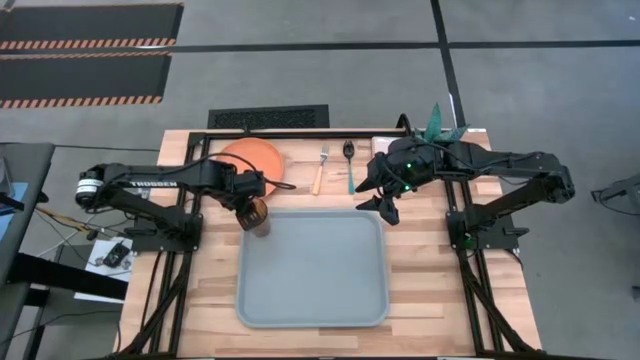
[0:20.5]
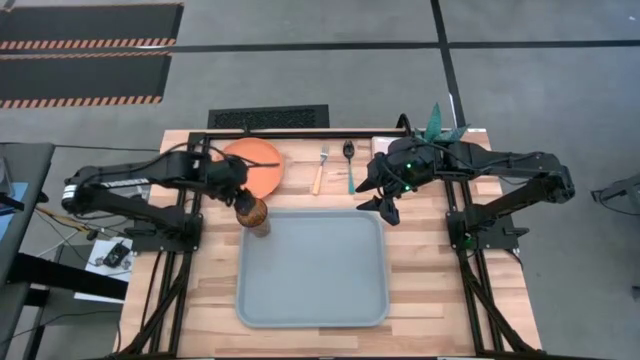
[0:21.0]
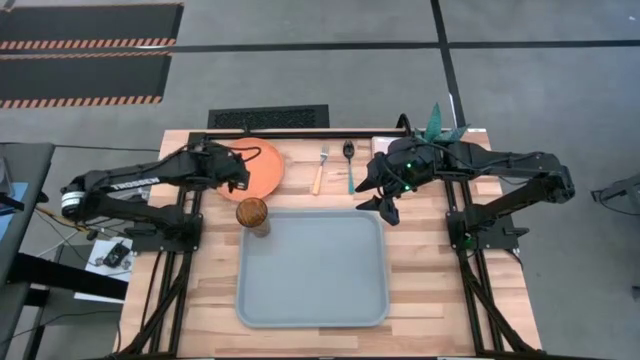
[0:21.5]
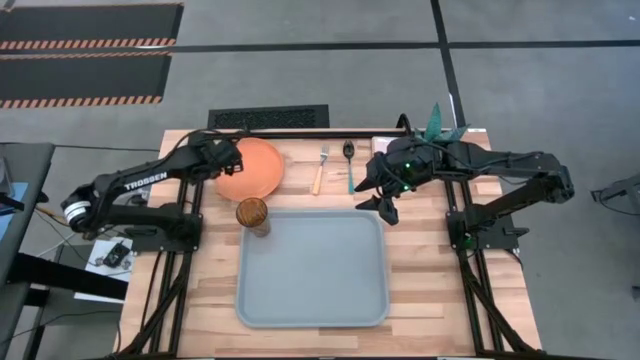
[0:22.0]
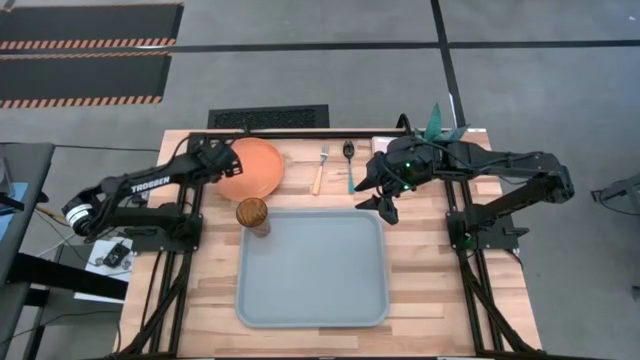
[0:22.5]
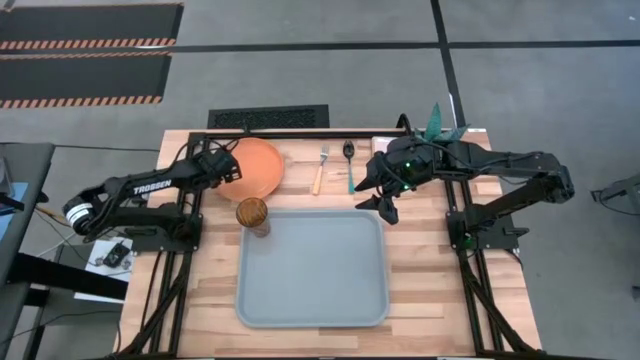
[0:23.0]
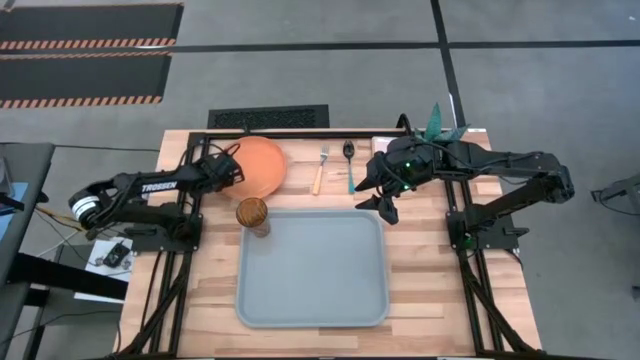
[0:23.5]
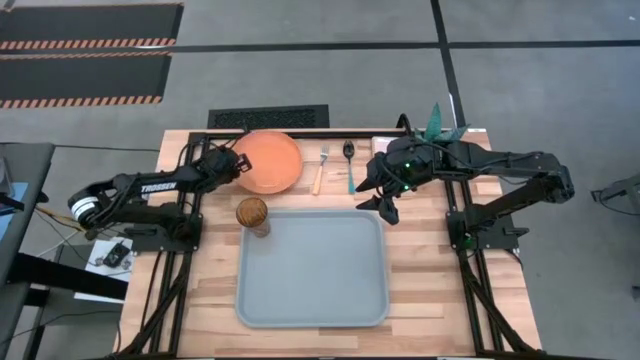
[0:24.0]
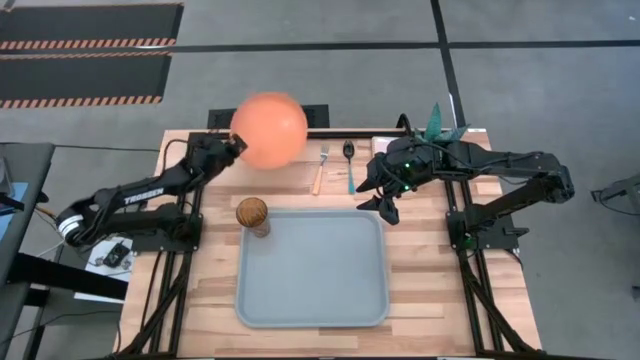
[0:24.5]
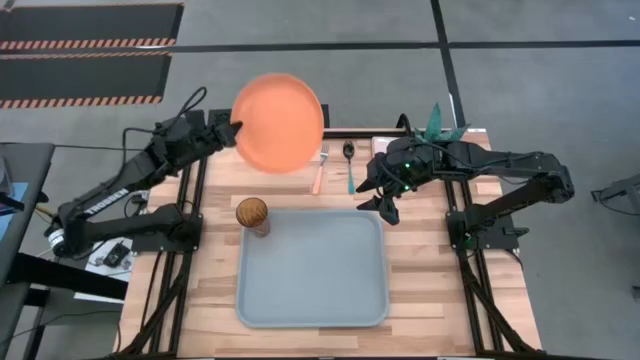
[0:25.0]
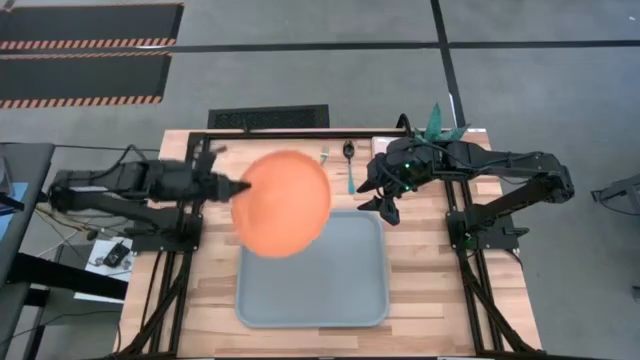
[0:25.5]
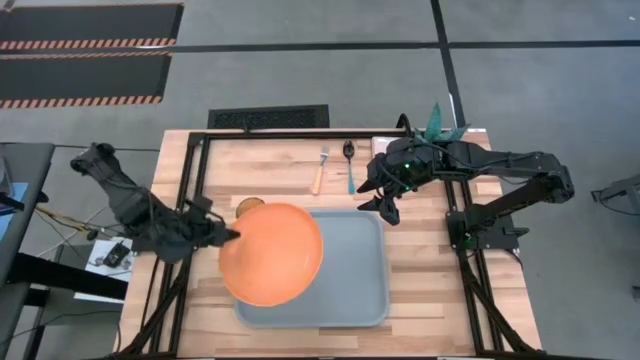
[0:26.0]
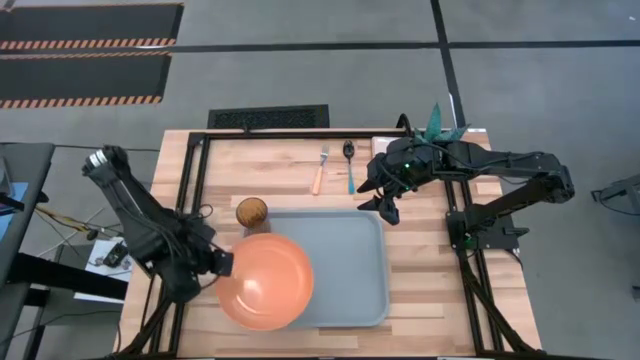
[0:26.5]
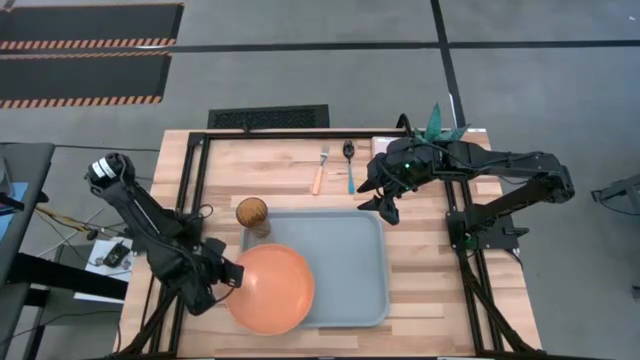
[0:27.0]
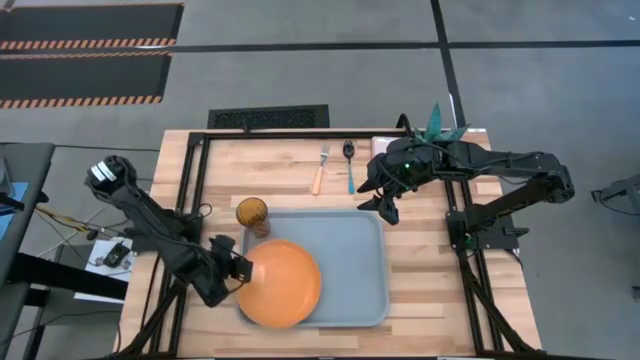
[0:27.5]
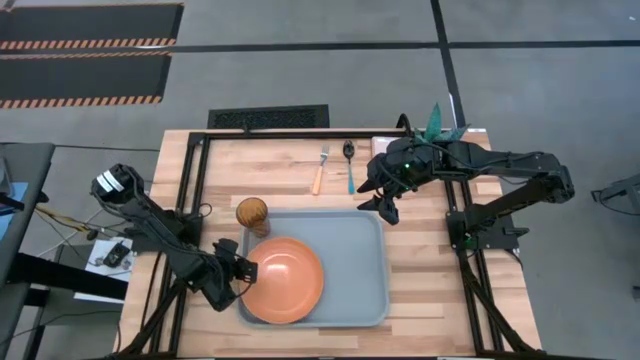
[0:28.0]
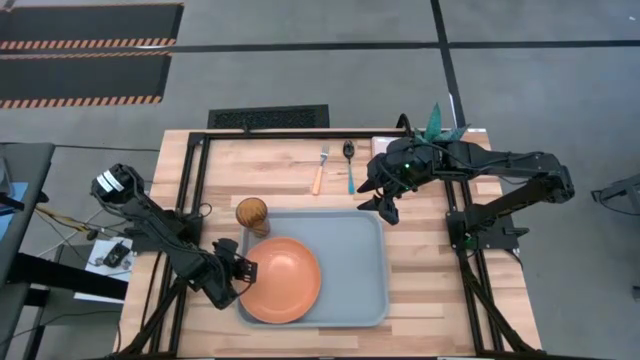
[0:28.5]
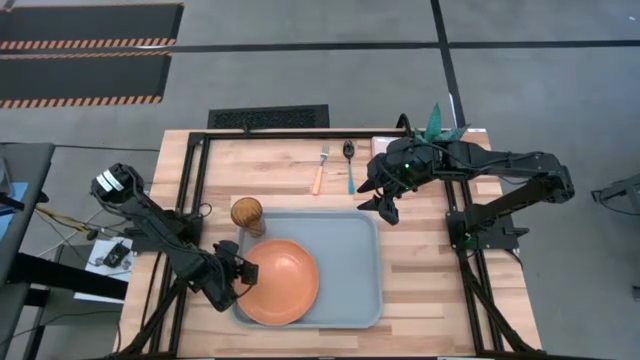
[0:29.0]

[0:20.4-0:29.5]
Task: Pick and place plate/cup/fork/spoon on tray
Put the orange plate on the gray tray at the bottom of the brown cup

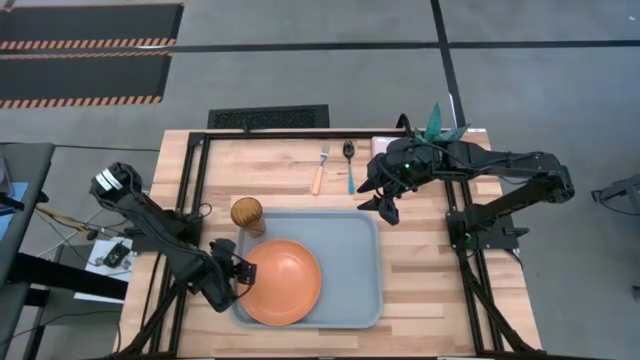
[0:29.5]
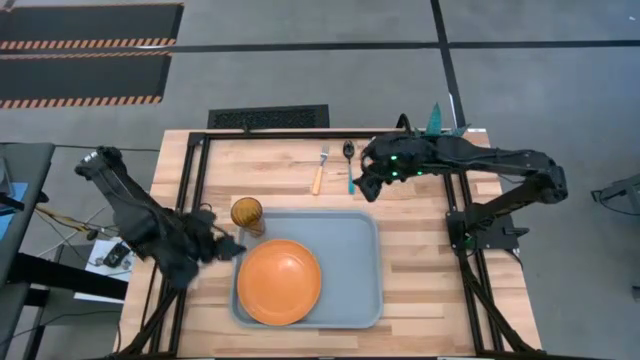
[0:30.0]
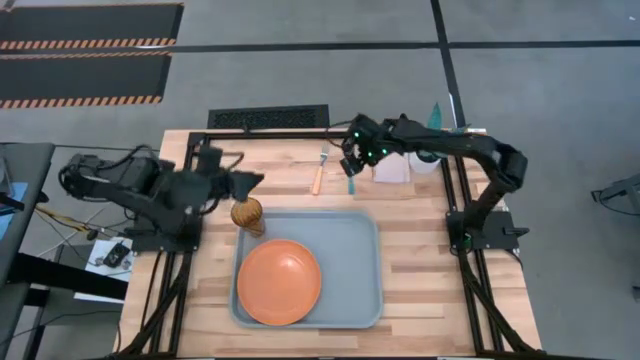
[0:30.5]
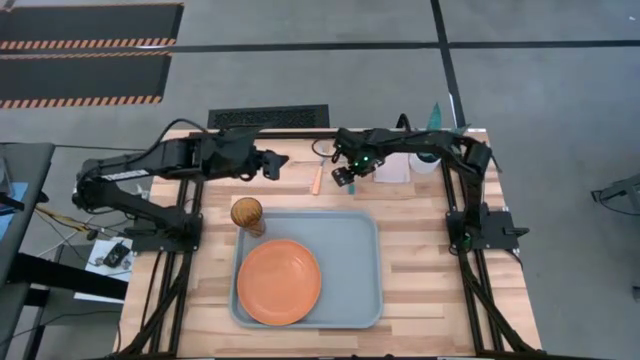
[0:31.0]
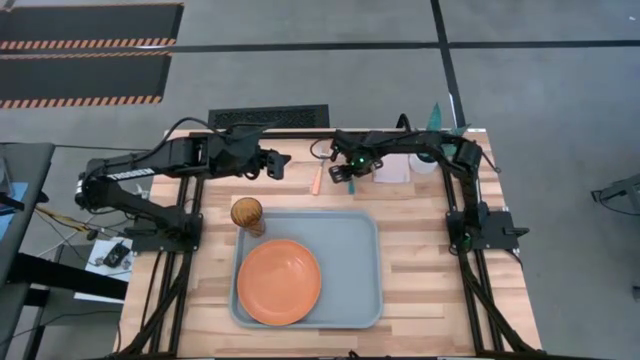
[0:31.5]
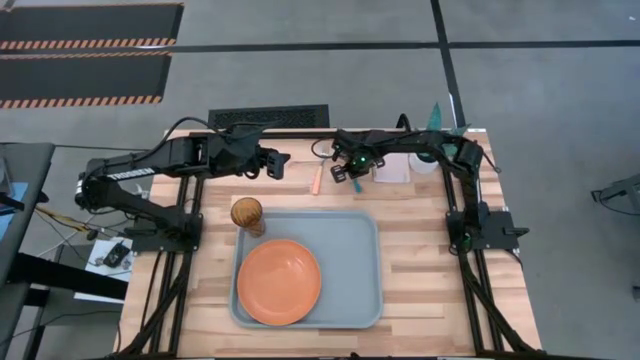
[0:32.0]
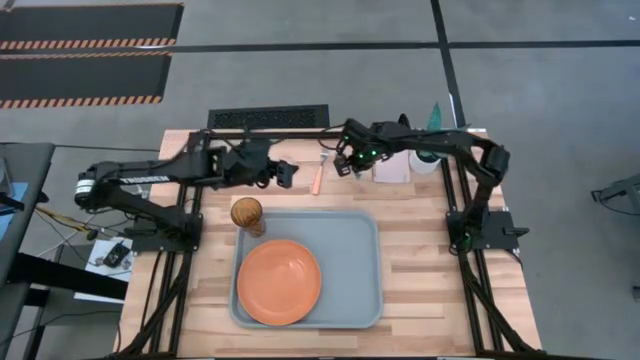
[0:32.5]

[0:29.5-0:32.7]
Put the blue spoon on the gray tray to the right of the orange plate

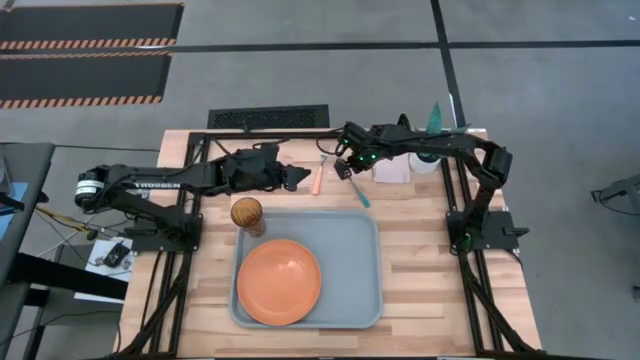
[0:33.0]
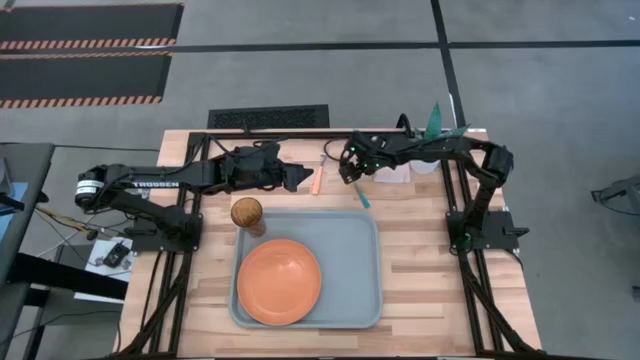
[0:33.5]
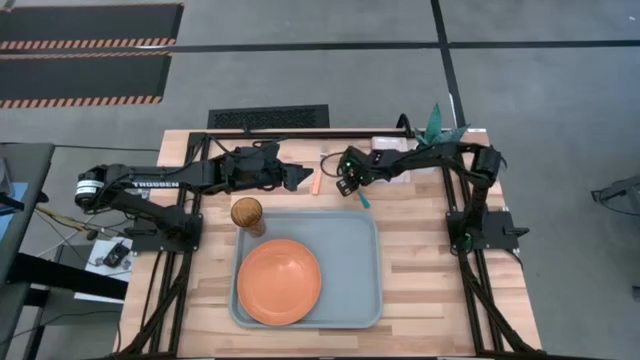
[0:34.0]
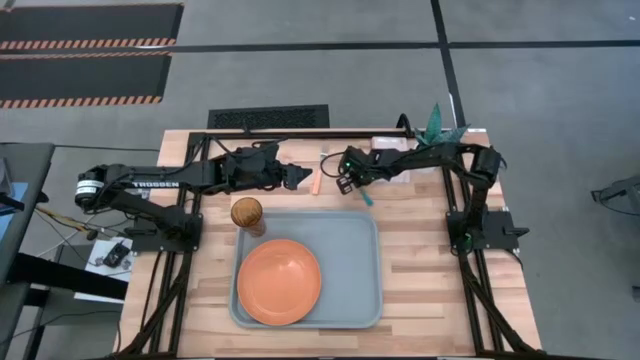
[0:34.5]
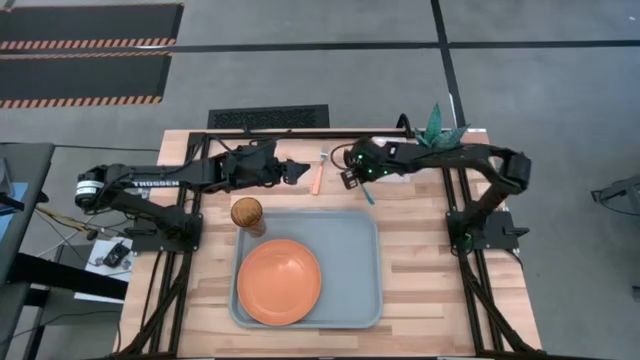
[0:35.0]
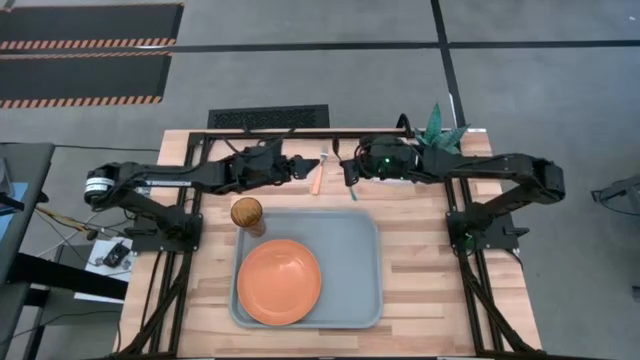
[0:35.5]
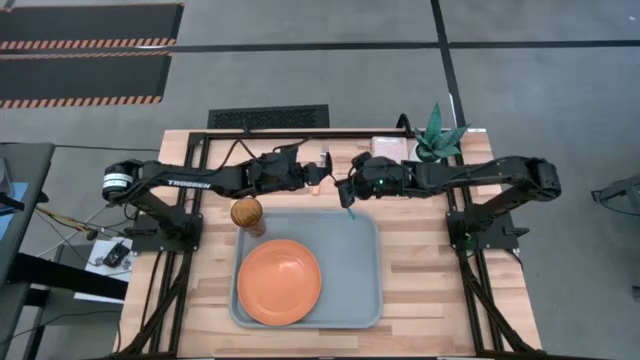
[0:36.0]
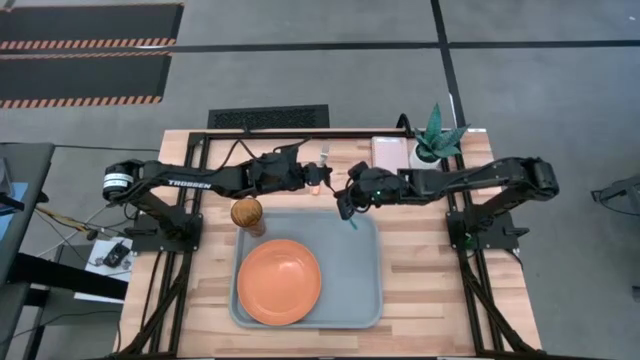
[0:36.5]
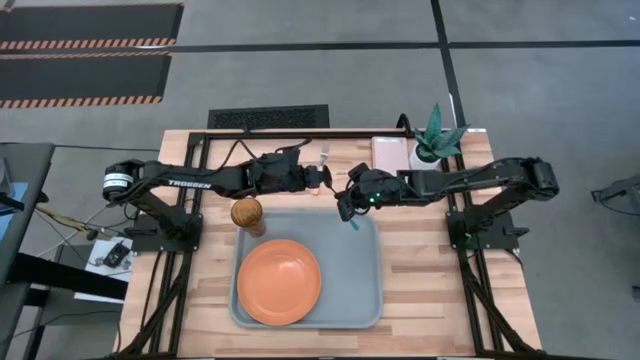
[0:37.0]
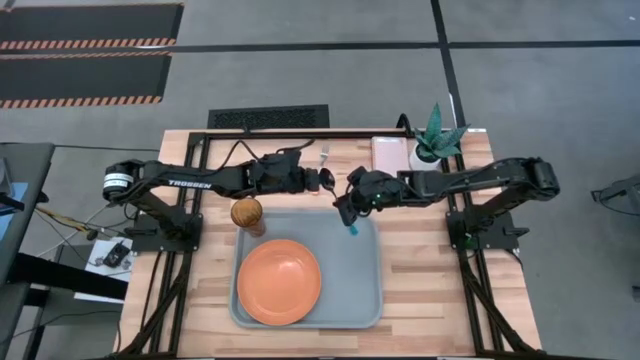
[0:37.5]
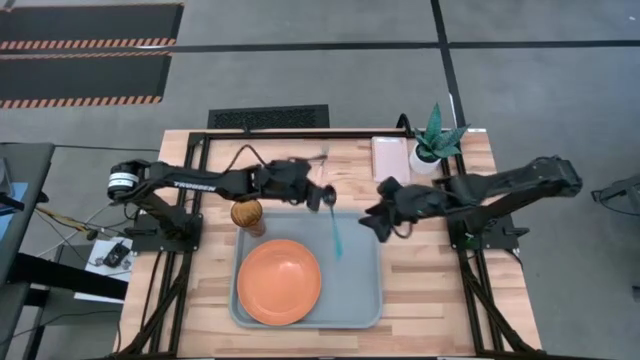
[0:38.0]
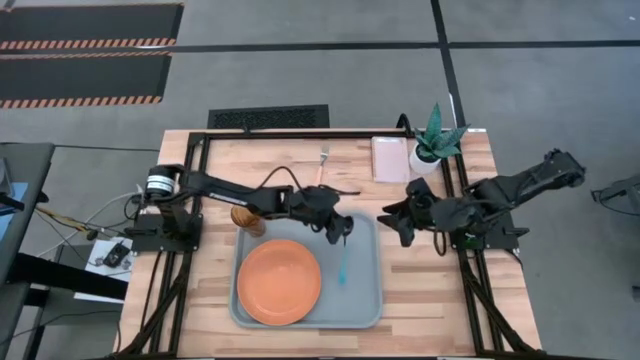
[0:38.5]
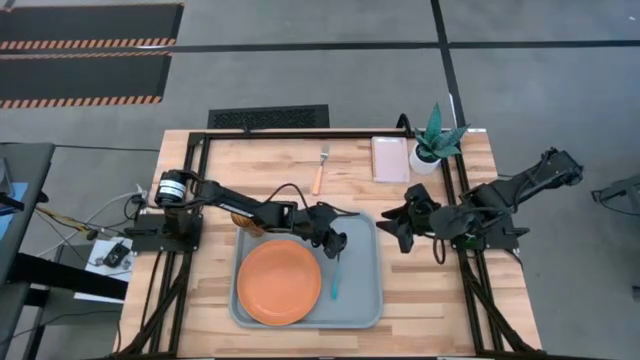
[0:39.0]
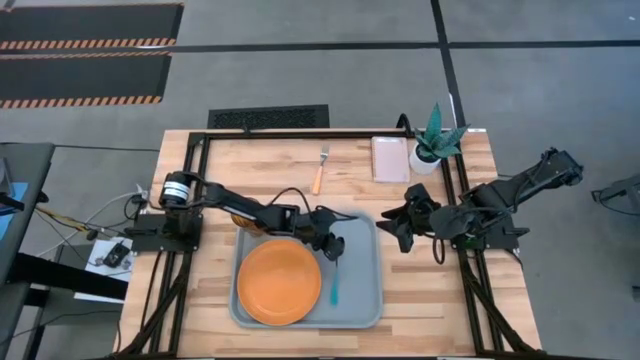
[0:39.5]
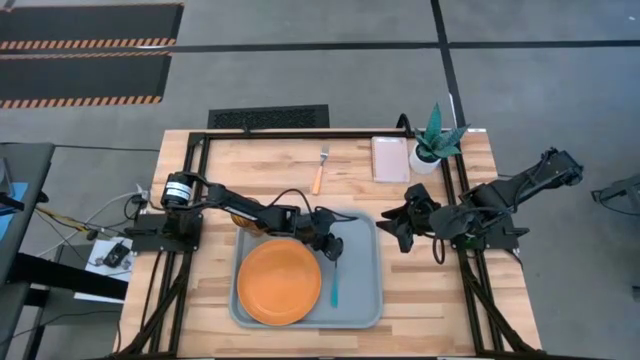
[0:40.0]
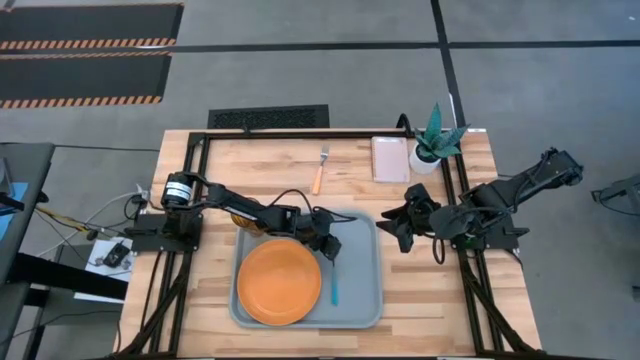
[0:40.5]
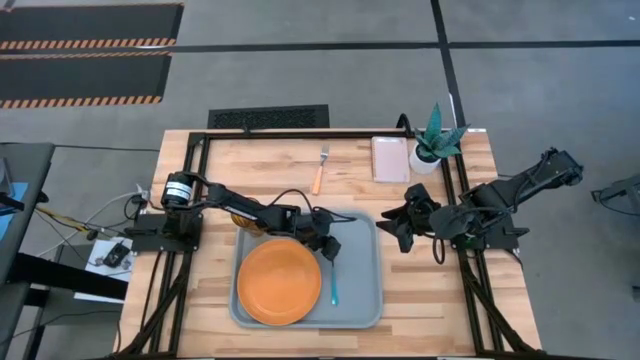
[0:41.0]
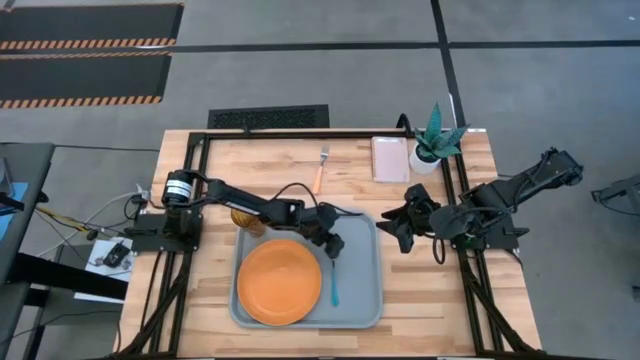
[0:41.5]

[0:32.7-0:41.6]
Put the blue spoon on the gray tray to the right of the orange plate
